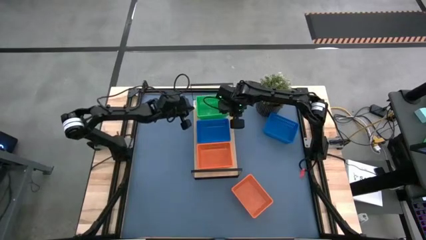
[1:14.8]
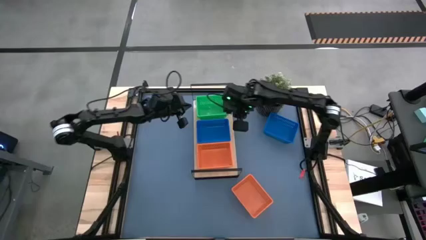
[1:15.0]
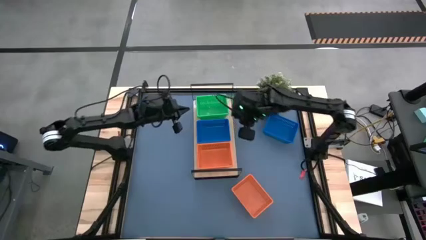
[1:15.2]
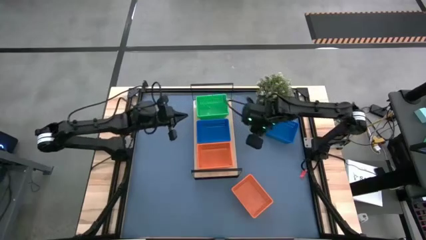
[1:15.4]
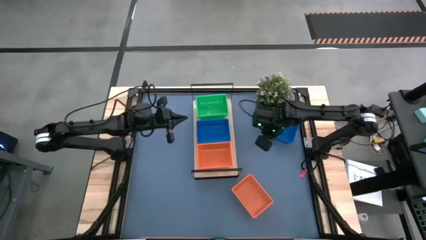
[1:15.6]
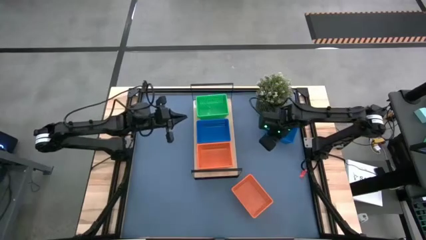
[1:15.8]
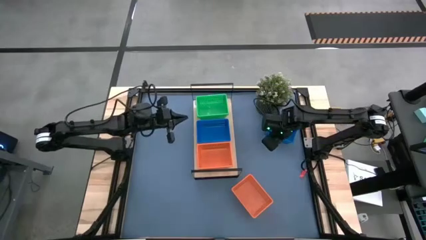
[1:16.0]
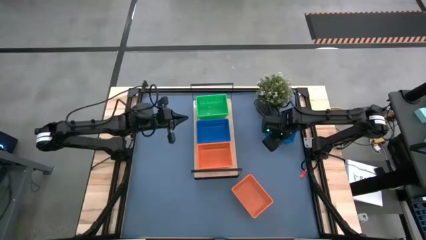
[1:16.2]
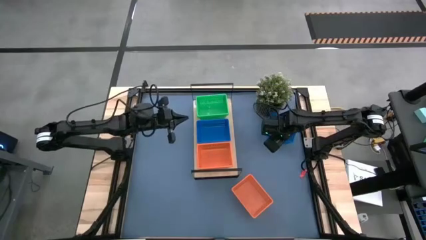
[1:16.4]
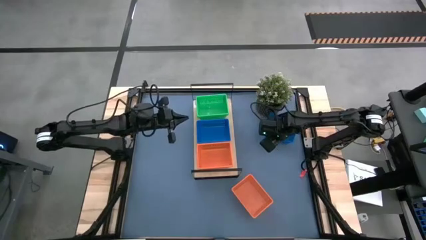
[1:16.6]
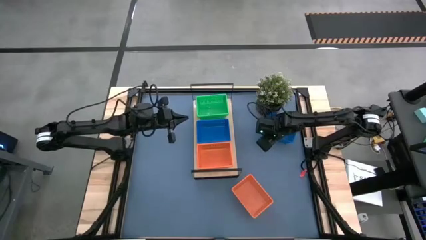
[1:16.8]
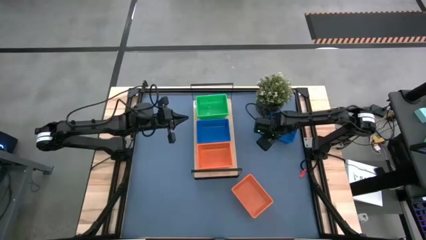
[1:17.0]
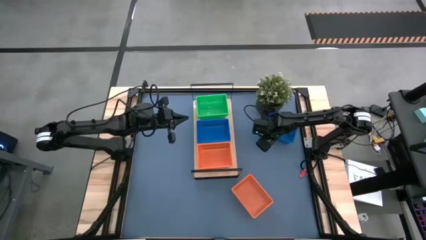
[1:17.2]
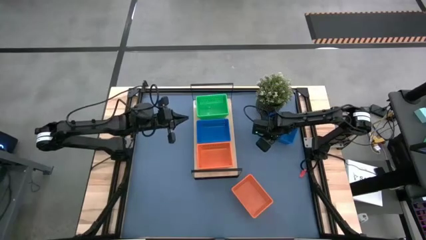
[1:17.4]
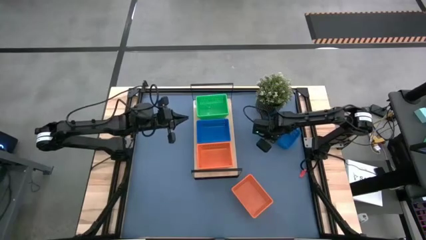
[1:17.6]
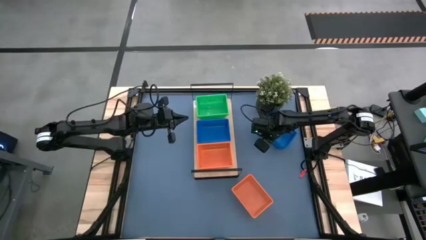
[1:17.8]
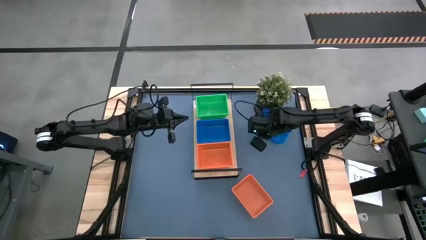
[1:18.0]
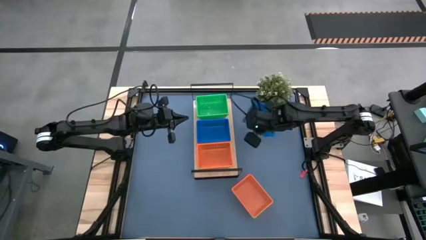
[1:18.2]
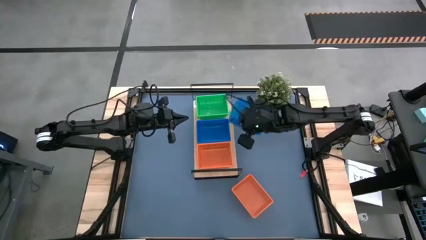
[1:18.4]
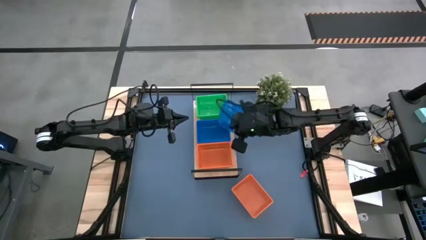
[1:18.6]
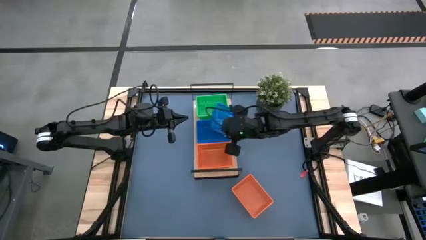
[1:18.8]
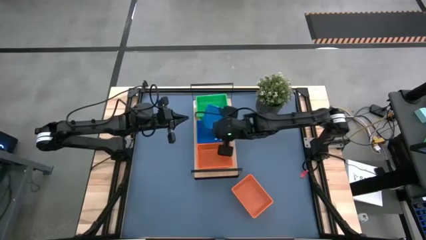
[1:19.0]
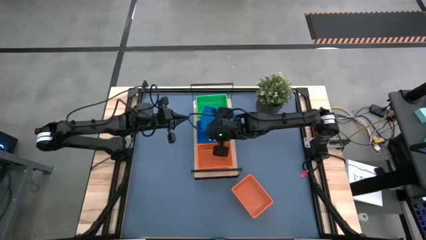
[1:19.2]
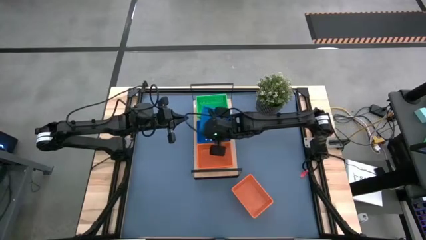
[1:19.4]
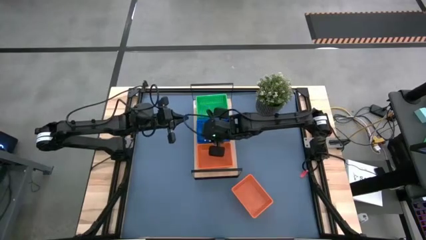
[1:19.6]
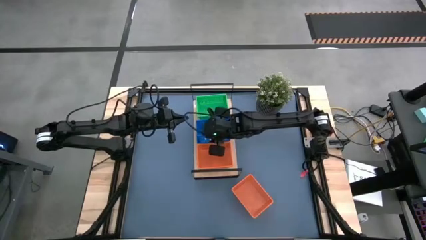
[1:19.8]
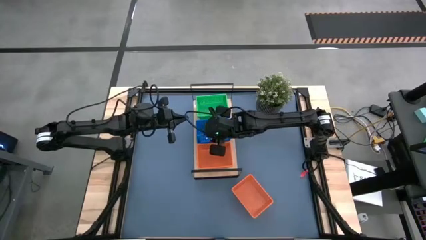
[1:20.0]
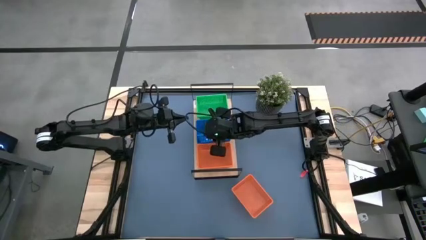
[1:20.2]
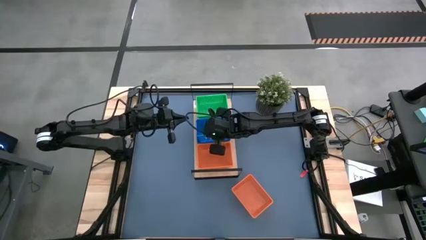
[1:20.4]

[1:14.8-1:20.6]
Task: Stack baskets on shelf by color
Stack the blue bin on top of the blue bin on the shelf

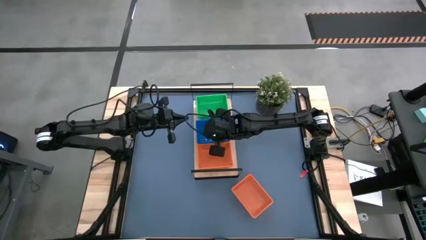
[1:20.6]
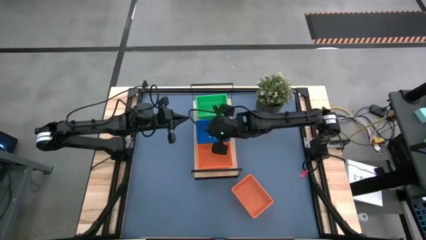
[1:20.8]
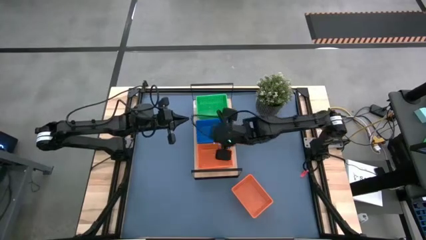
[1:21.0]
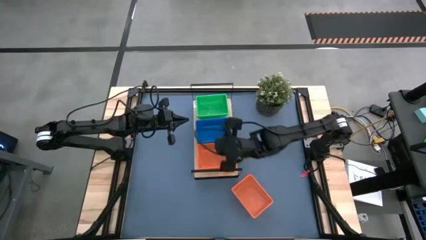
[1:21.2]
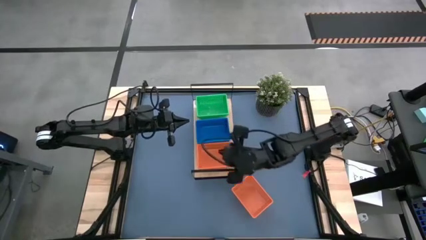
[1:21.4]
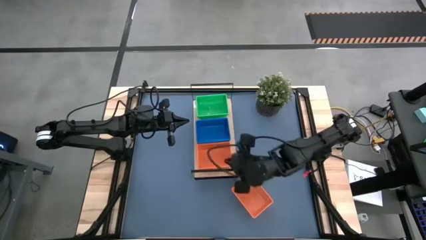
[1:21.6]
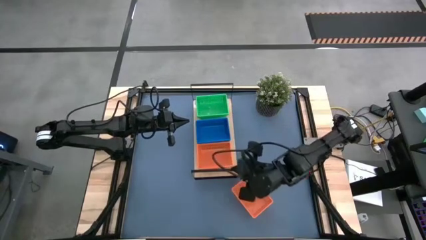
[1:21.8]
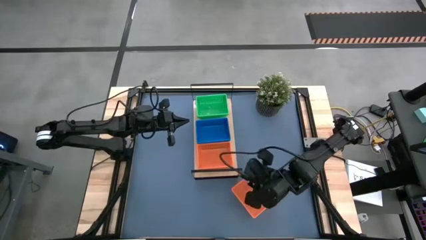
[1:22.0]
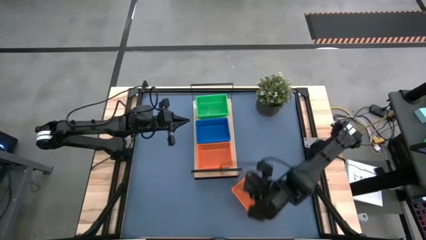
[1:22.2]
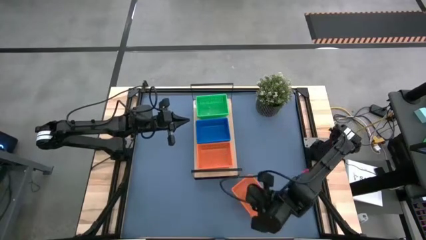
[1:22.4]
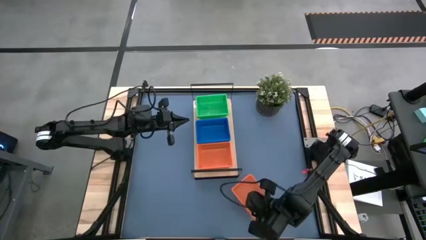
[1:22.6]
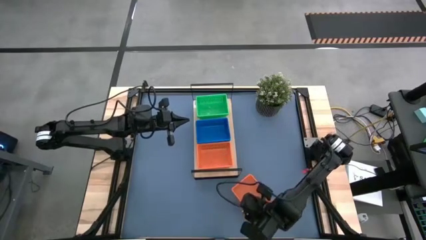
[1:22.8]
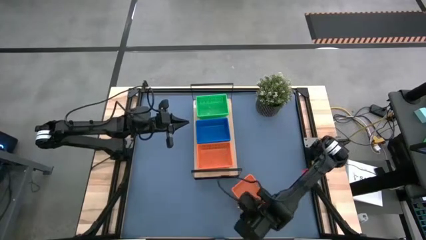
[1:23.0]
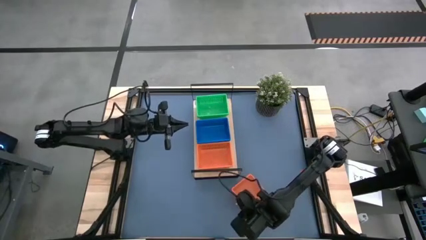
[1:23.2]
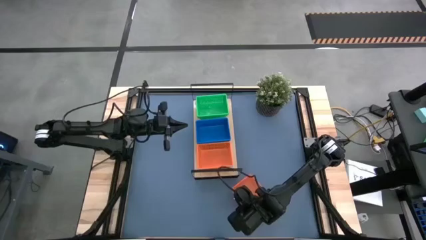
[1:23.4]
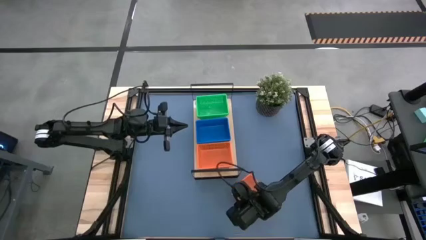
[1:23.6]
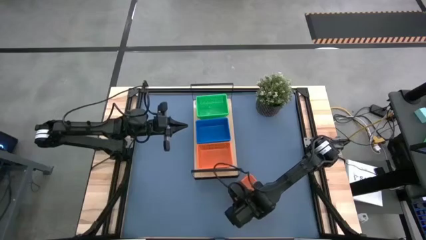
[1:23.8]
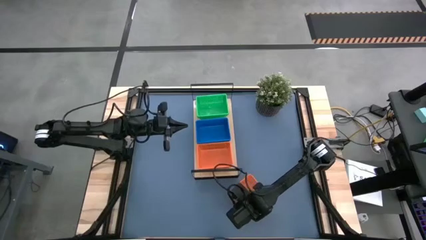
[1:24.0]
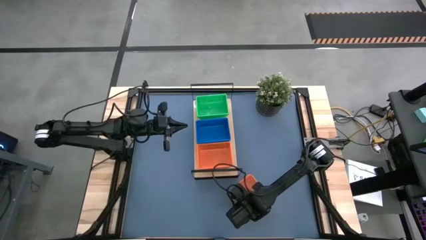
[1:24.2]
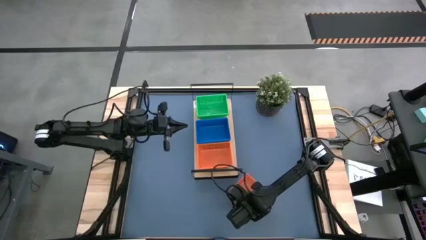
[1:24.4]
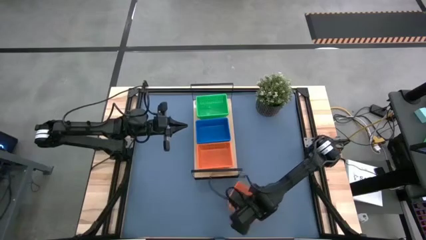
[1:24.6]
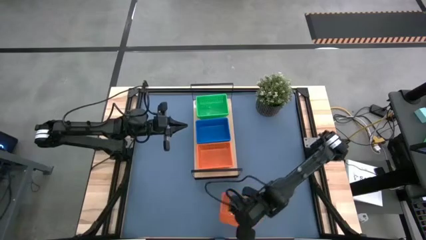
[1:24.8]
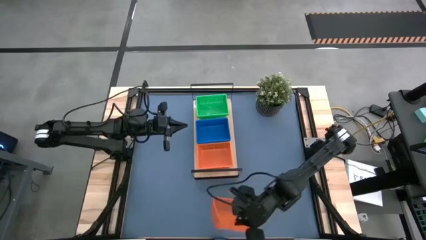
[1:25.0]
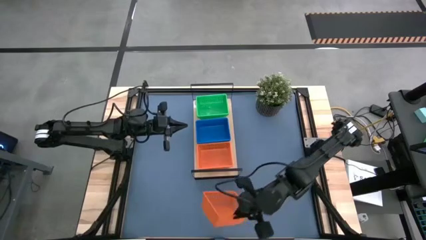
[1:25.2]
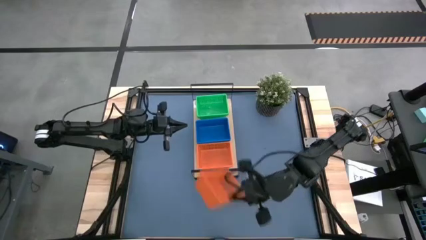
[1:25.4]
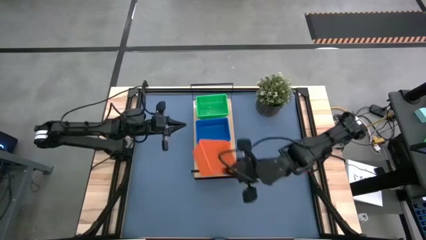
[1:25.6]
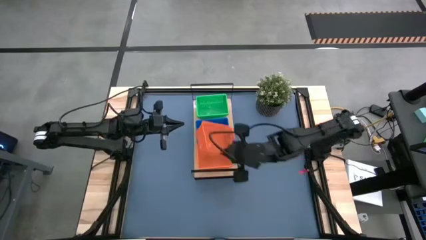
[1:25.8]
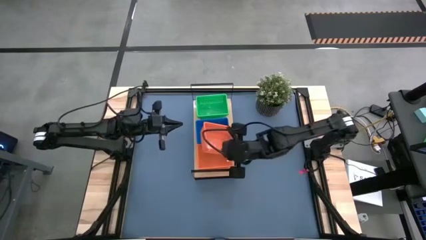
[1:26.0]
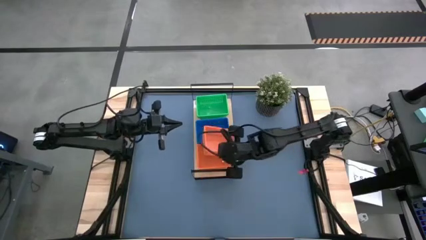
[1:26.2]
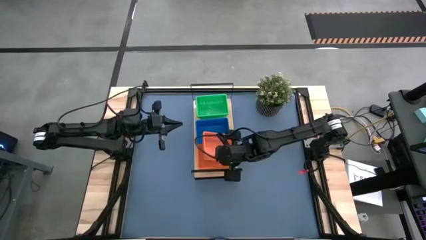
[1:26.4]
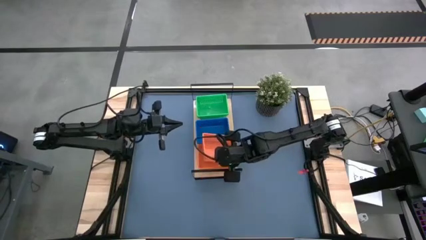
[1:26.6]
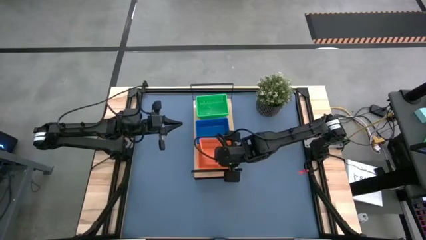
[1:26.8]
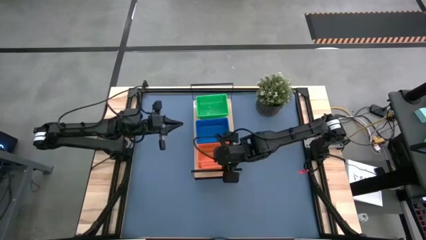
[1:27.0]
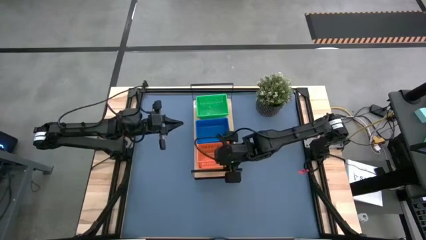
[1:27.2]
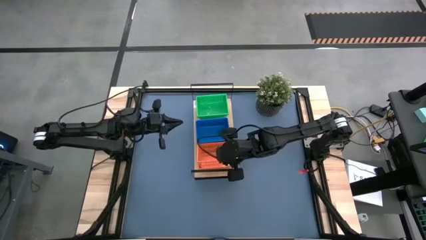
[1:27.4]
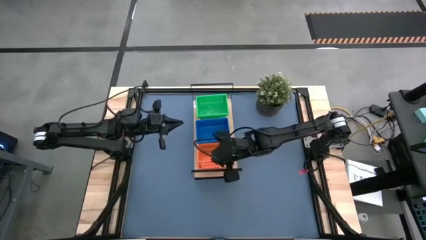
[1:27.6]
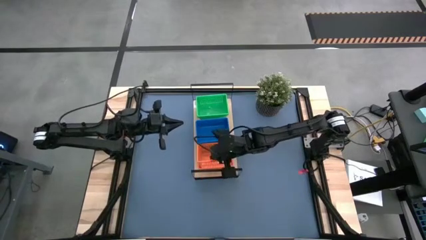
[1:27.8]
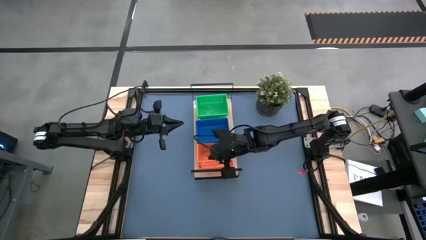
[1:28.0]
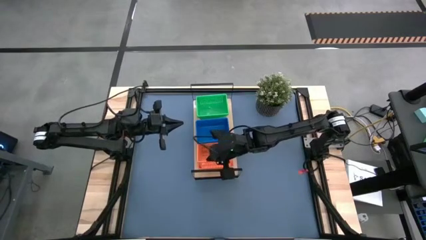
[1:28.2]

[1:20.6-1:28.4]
Stack the orange bin on top of the orange bin on the shelf

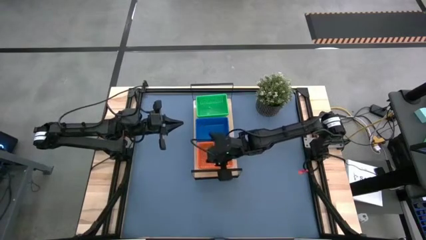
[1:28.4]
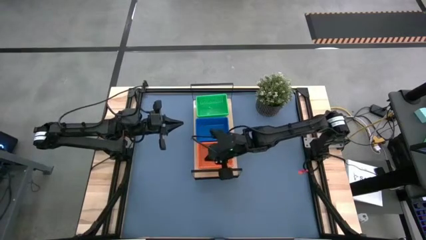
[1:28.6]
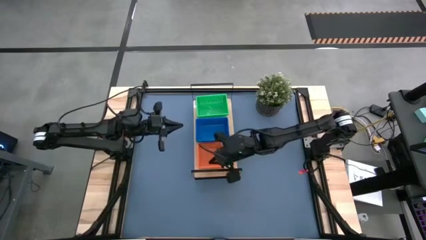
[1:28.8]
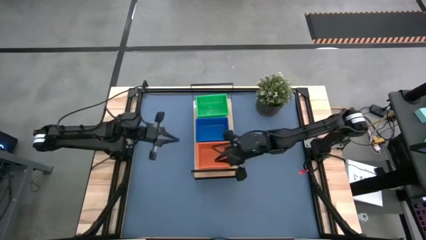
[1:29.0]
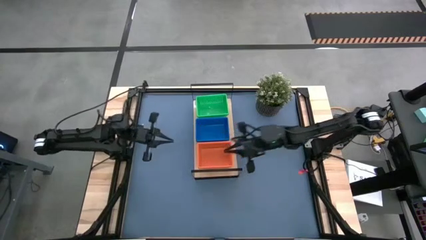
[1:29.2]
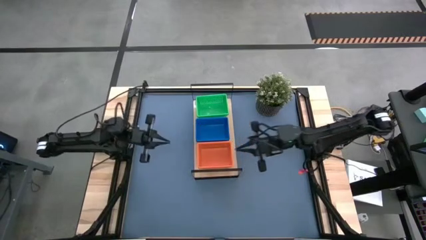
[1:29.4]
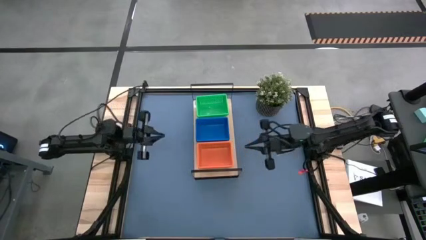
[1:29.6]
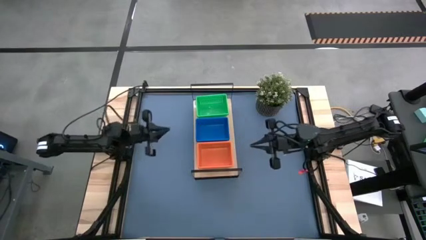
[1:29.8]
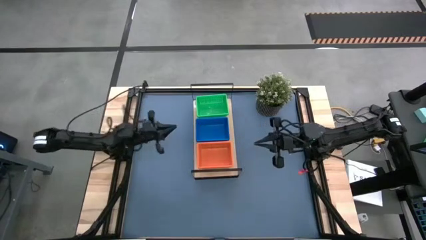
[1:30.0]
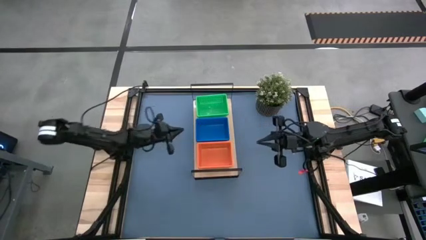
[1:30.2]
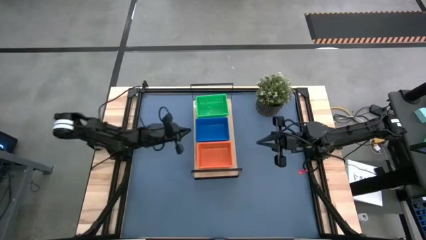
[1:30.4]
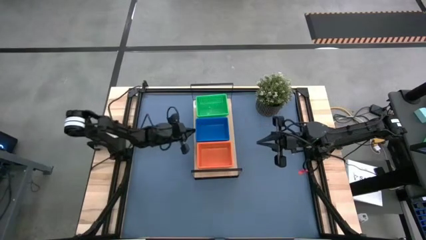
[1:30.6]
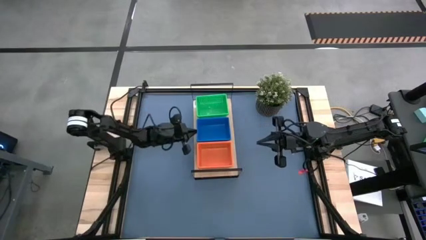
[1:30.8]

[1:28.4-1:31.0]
Adjust the stacked blue bins on the shelf
